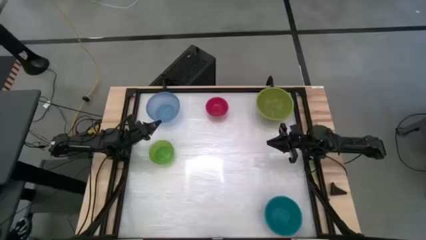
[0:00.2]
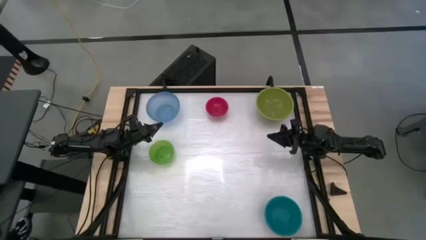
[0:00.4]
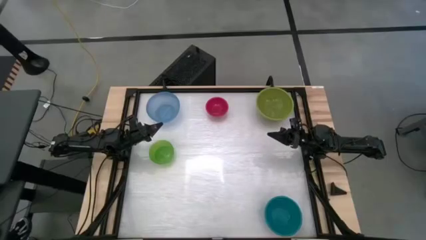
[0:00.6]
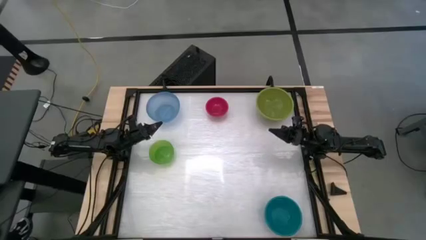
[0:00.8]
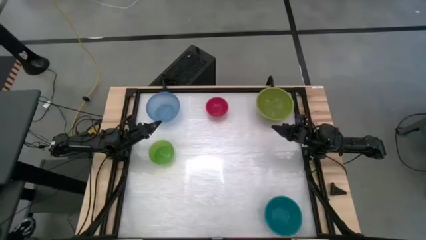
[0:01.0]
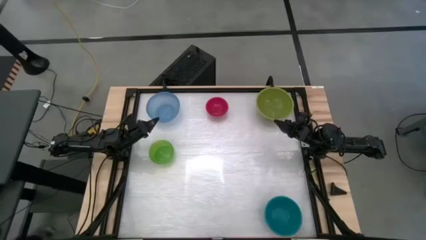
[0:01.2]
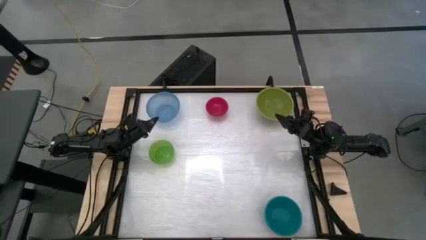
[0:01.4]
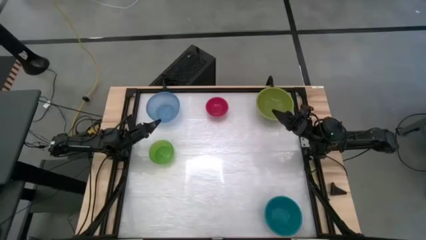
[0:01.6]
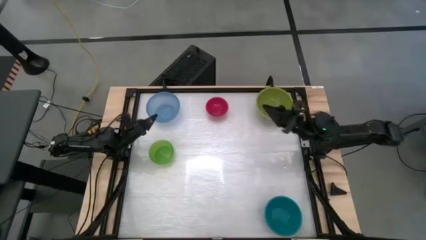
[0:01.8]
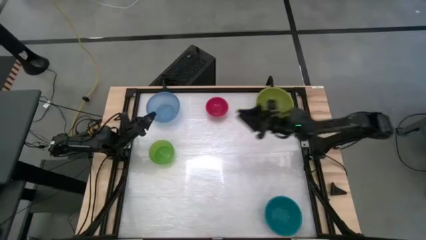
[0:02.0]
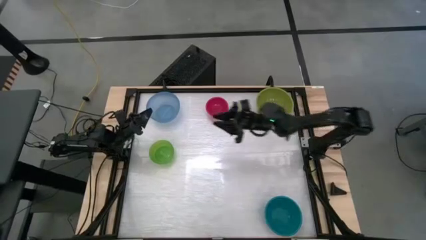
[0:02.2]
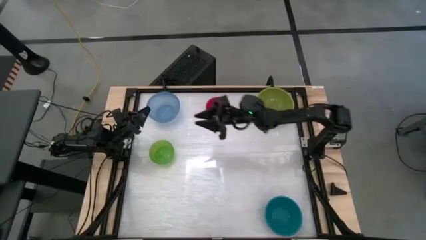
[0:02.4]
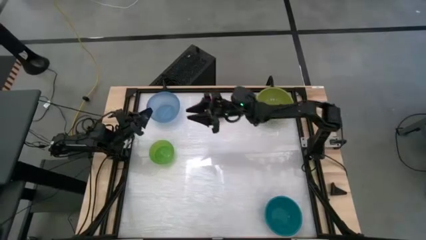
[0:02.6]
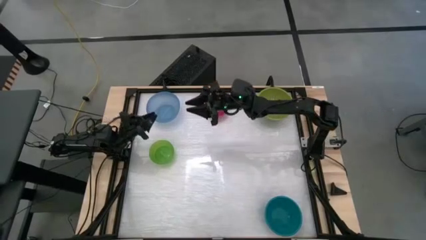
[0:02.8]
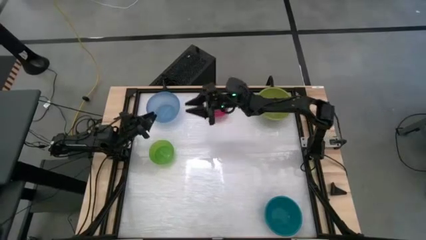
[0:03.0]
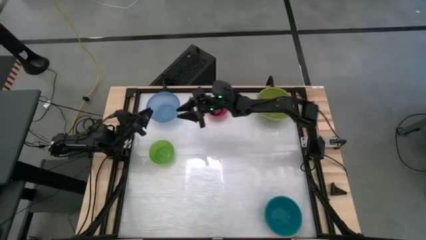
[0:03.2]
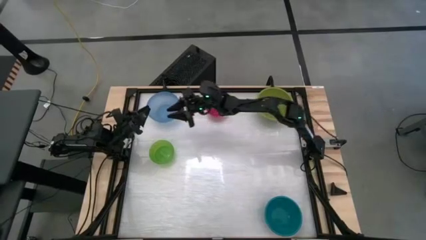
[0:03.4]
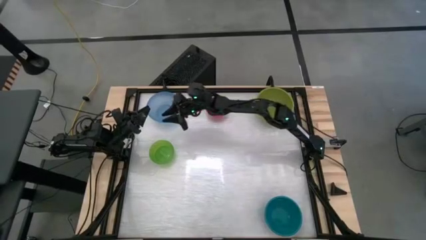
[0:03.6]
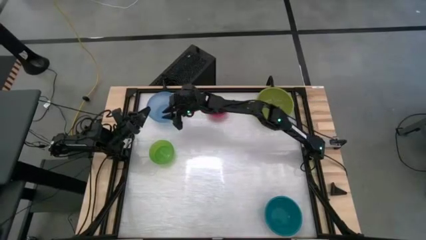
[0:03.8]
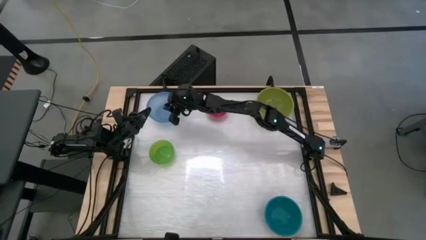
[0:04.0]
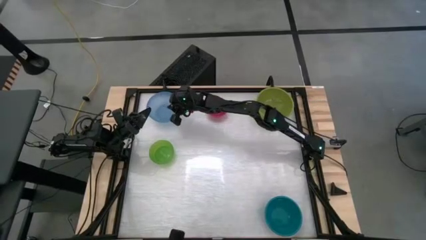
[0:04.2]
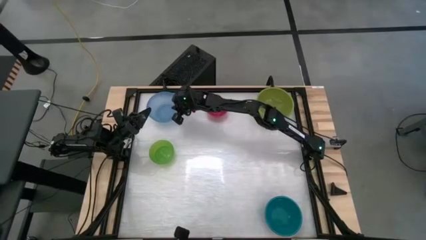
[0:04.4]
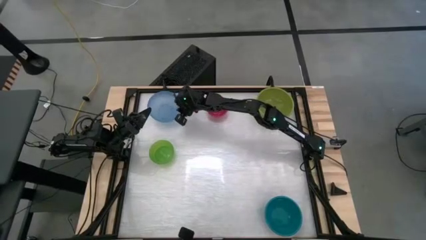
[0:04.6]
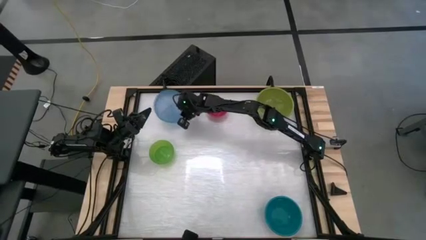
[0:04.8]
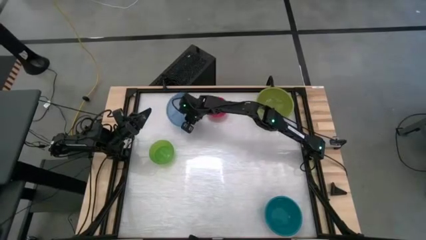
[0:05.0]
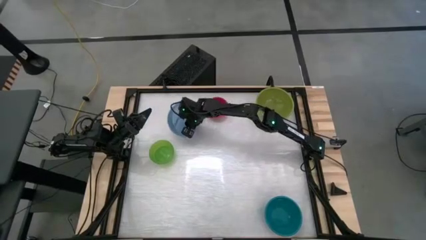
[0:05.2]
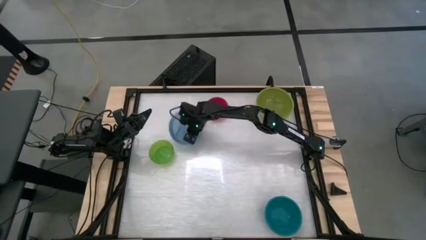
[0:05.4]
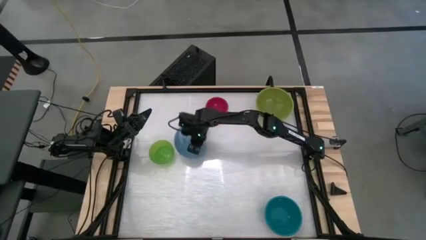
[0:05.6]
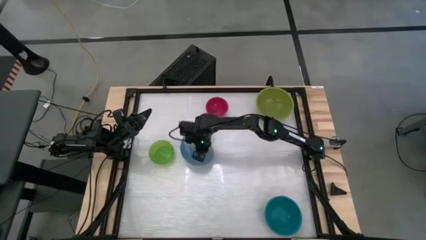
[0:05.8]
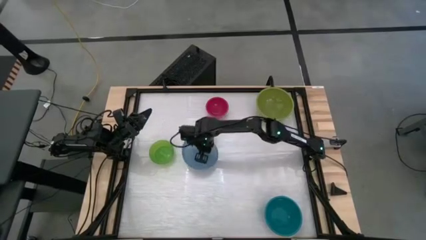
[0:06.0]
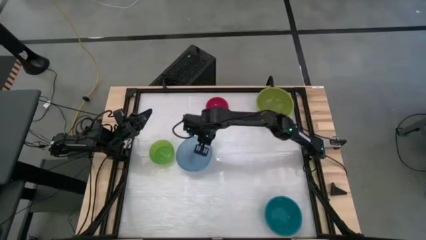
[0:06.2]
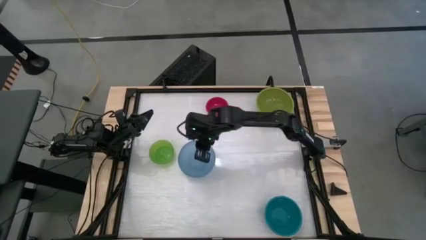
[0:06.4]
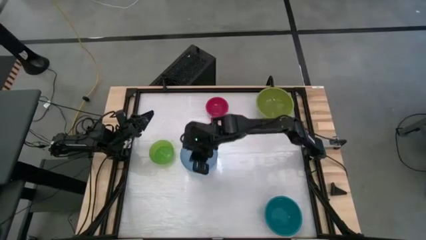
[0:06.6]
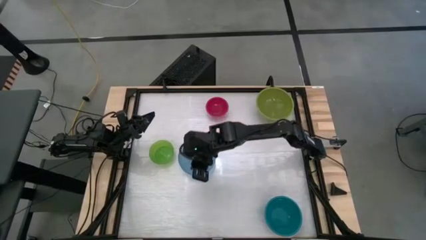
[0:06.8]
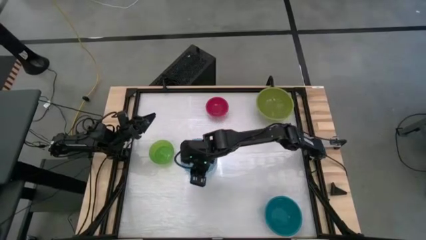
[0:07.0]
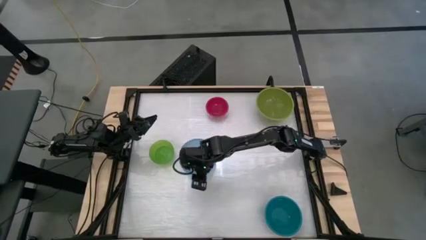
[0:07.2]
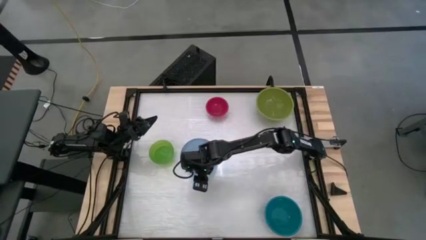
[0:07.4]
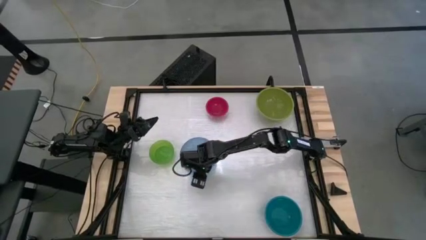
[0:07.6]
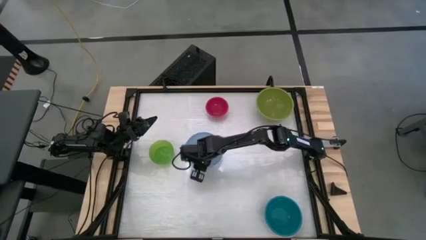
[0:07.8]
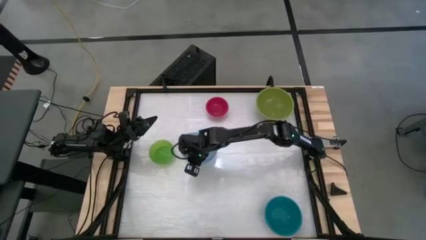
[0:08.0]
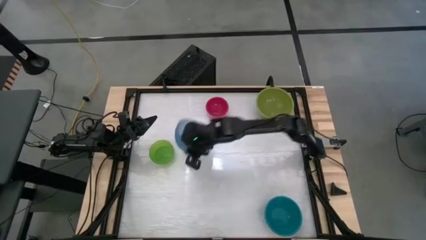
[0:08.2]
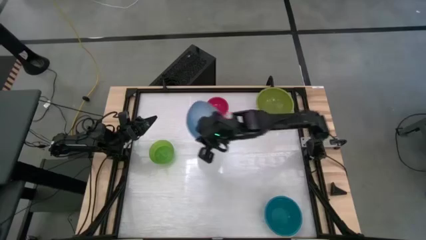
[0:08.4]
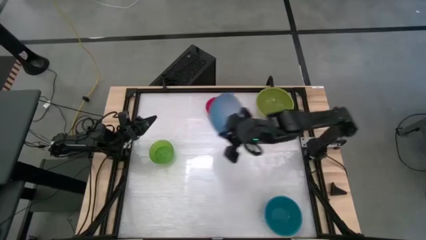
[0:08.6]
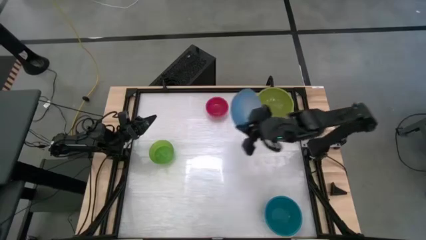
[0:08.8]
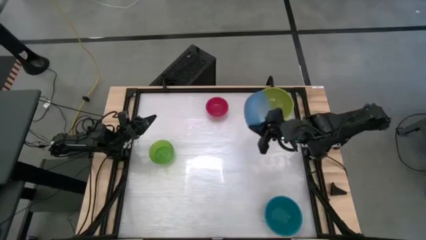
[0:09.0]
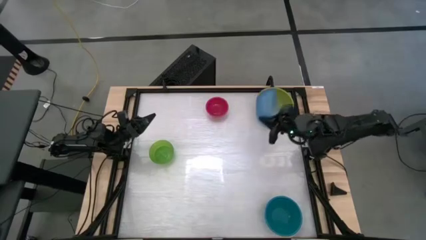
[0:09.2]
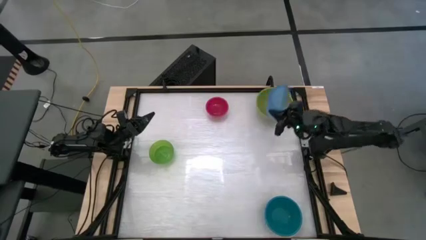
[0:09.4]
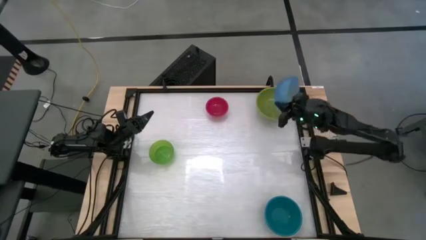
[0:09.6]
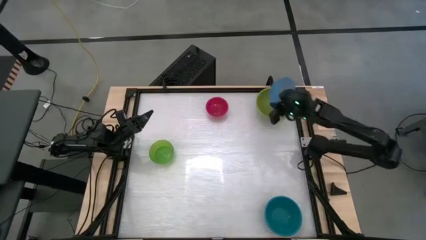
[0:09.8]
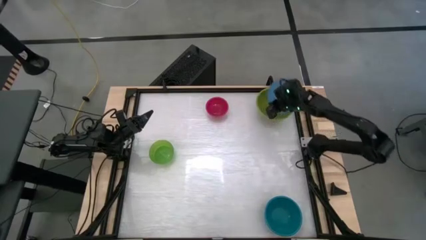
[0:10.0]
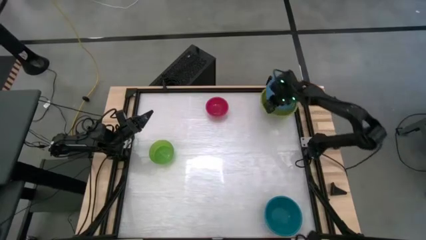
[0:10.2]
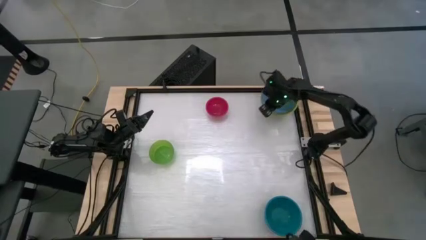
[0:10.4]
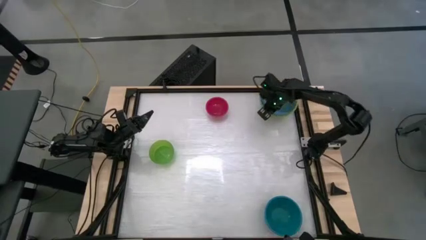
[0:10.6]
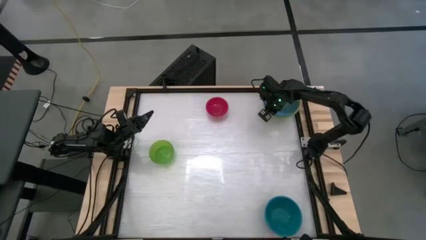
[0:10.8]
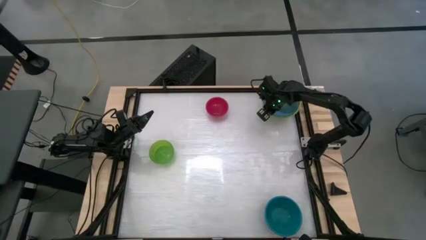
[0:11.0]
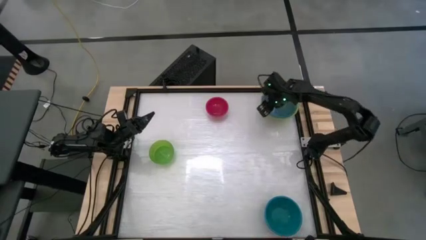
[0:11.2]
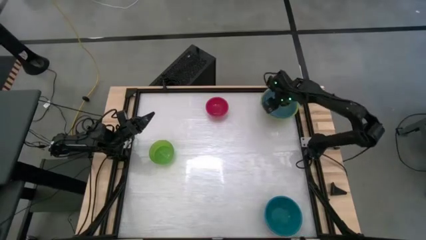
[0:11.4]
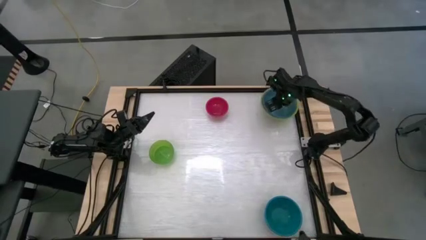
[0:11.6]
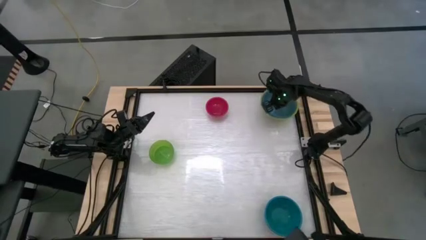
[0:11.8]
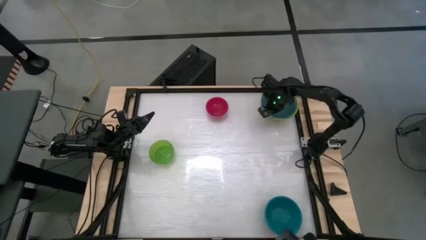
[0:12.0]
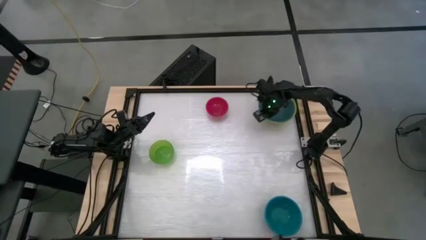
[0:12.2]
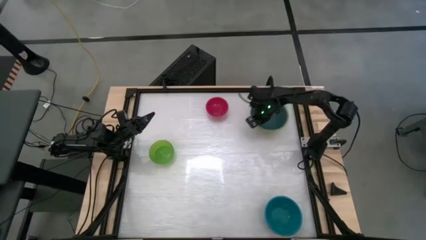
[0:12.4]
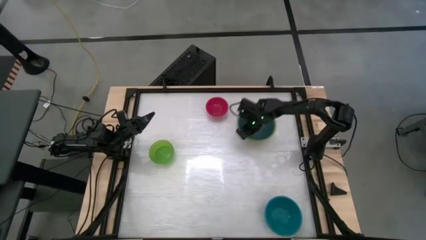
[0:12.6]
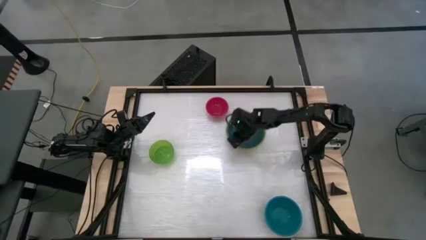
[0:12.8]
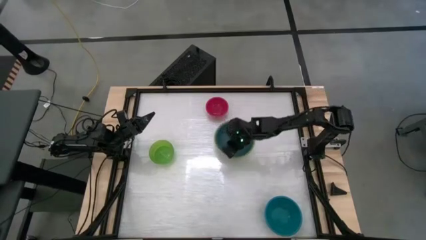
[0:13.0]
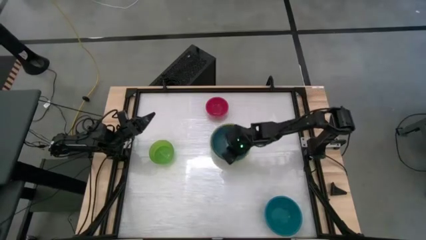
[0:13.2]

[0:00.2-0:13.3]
Stack the blue bowl on the light green bowl

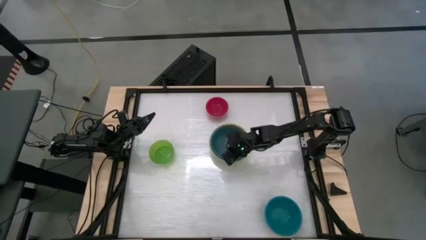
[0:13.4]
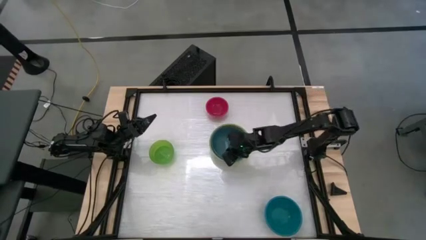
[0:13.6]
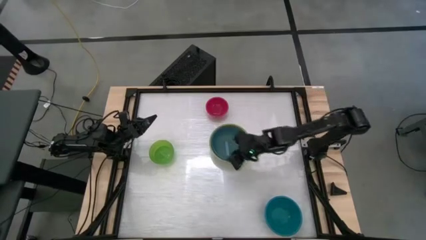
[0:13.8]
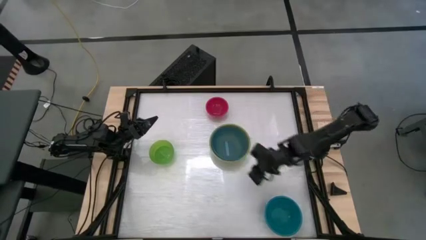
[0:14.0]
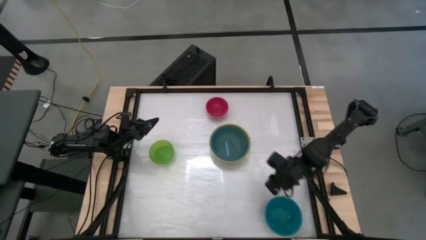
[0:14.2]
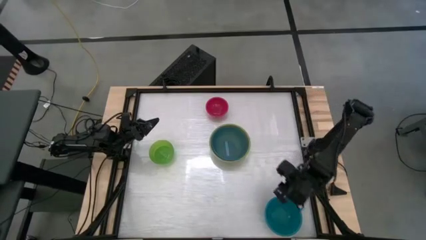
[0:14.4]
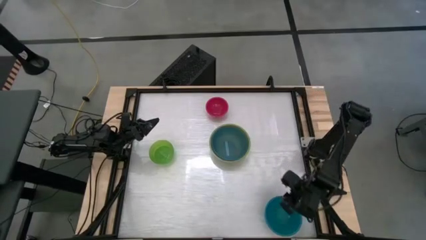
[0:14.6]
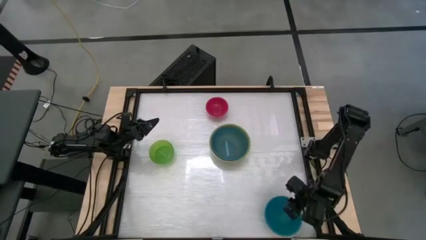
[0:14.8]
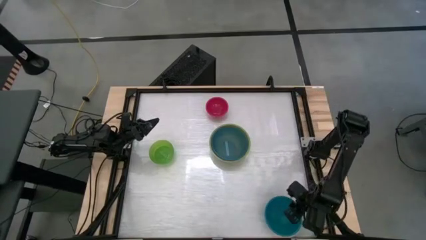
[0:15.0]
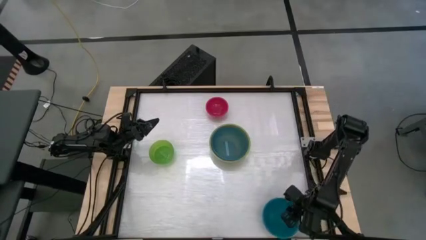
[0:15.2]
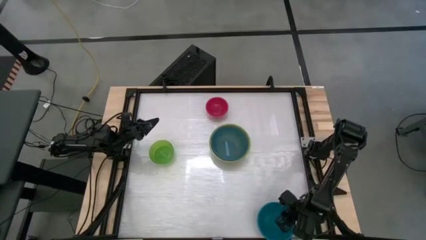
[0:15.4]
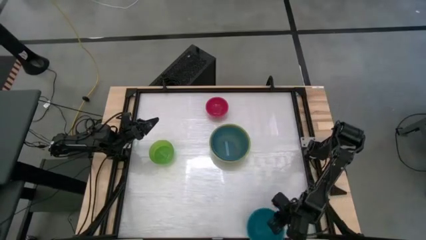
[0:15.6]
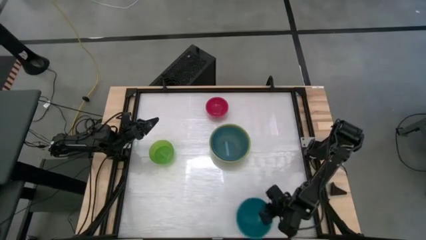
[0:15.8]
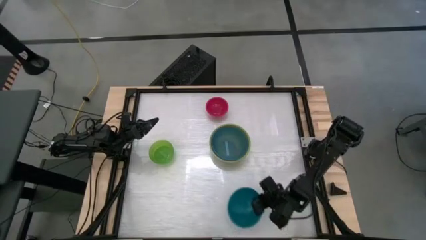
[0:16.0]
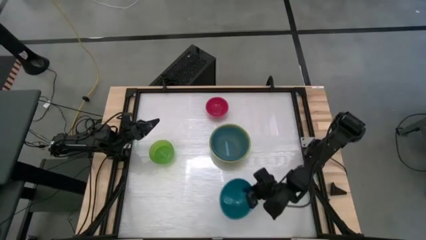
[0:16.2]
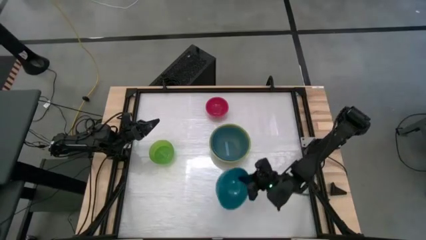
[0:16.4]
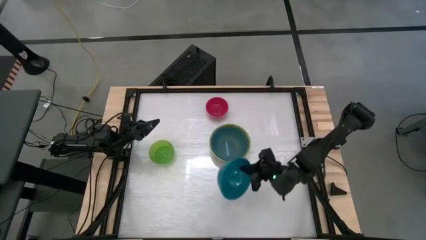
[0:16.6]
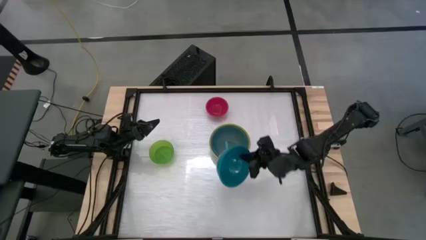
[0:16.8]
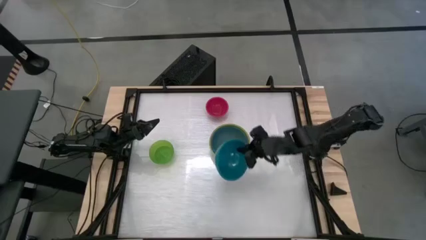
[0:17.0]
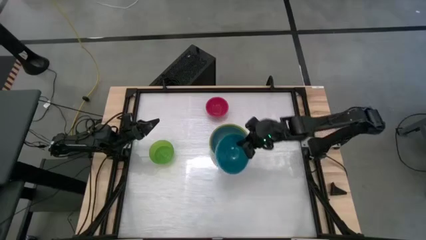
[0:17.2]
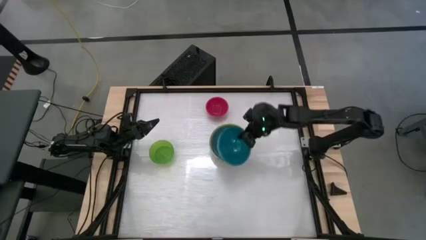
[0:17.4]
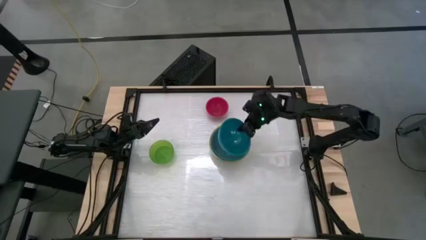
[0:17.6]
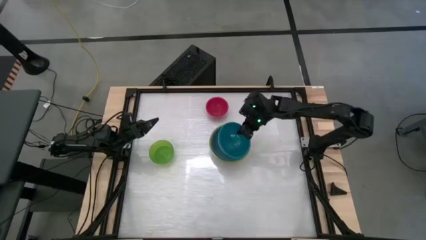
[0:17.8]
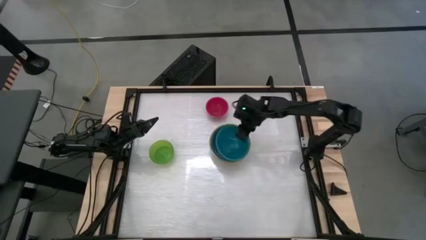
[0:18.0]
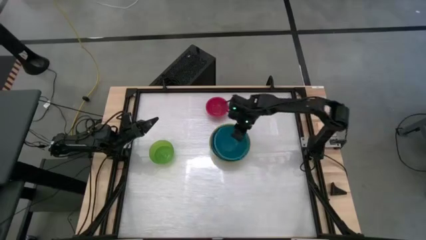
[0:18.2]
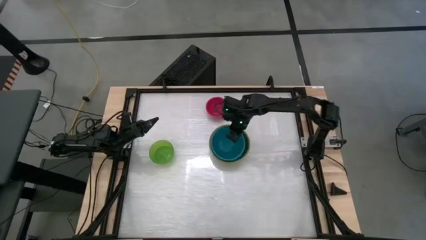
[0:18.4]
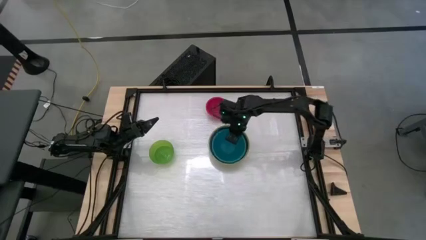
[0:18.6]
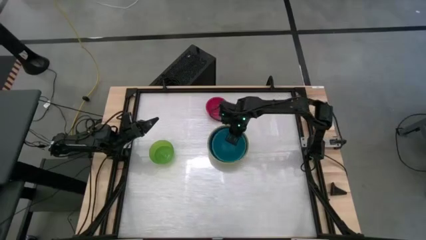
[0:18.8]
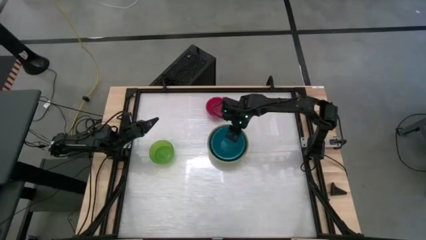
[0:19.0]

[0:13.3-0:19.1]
Stack the light blue bowl on the blue bowl
